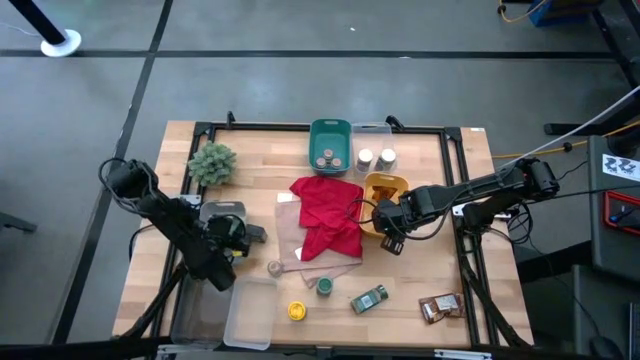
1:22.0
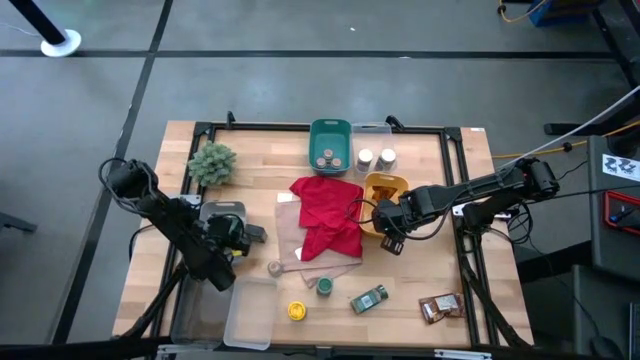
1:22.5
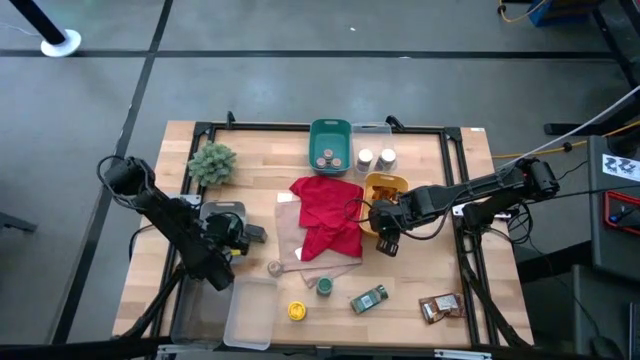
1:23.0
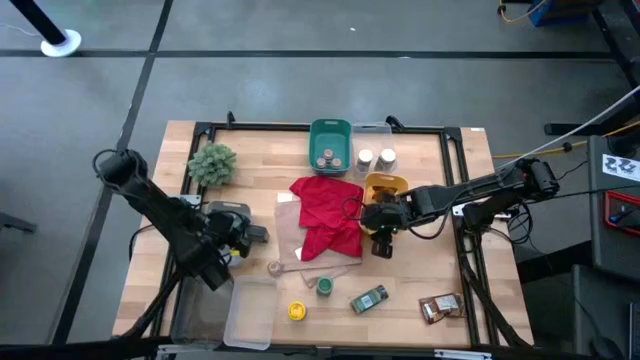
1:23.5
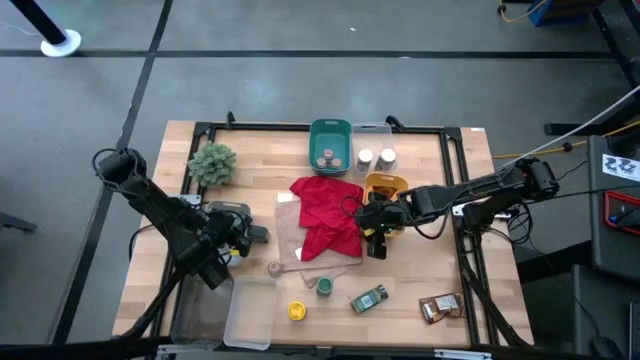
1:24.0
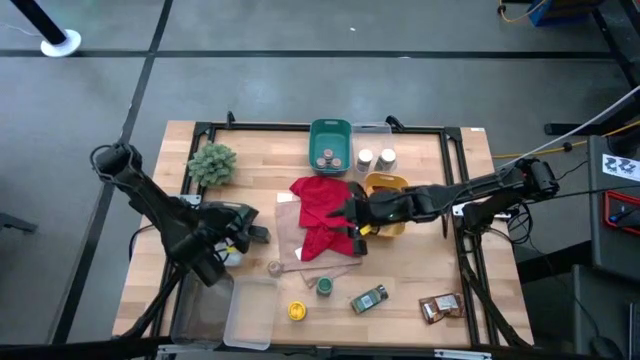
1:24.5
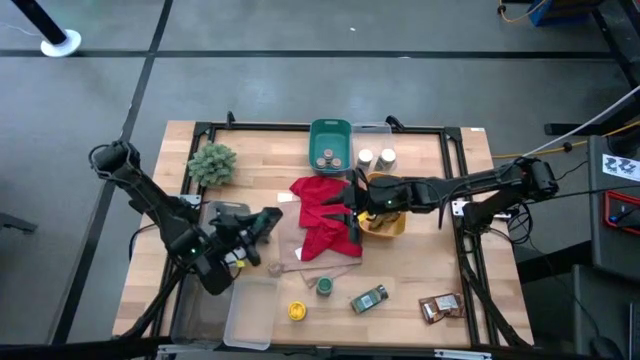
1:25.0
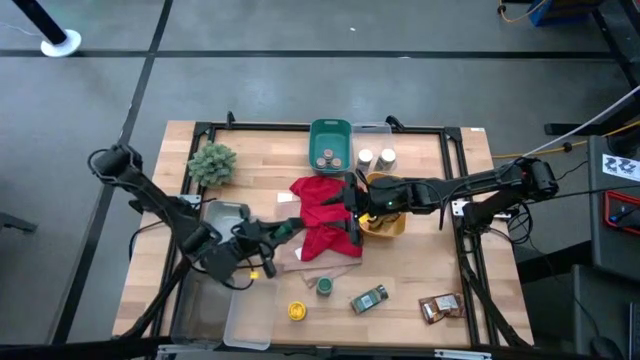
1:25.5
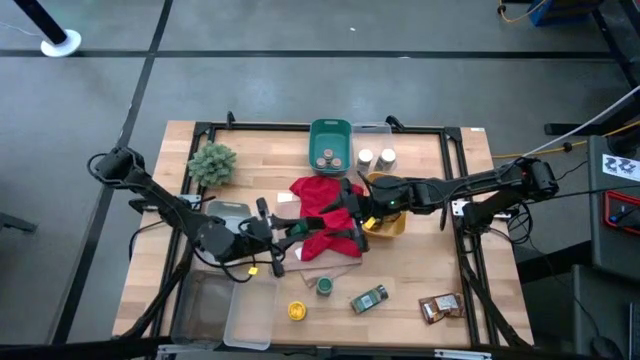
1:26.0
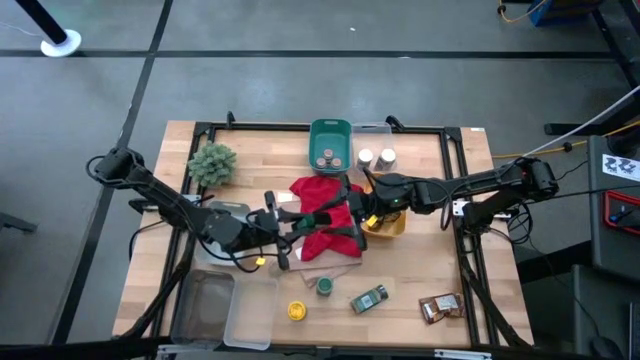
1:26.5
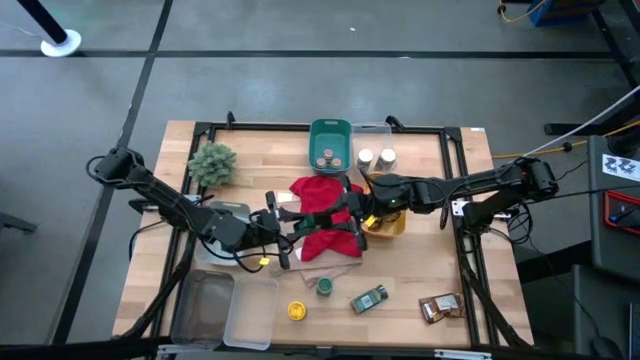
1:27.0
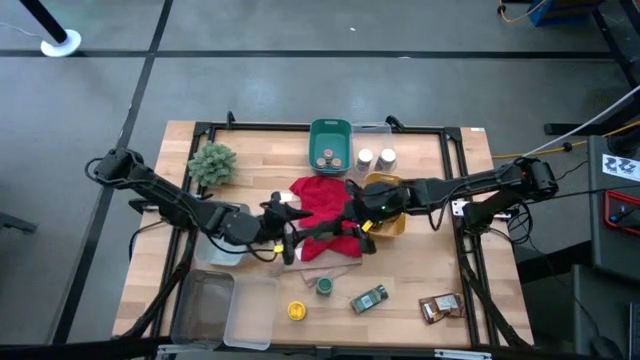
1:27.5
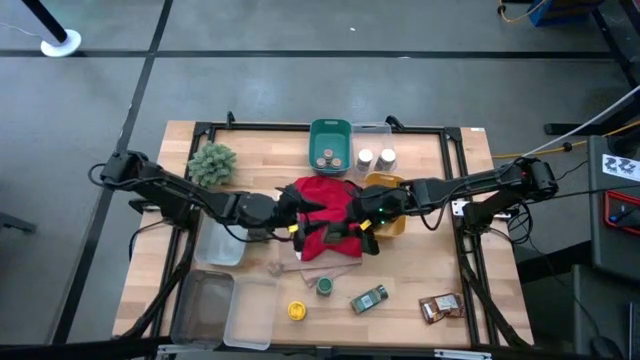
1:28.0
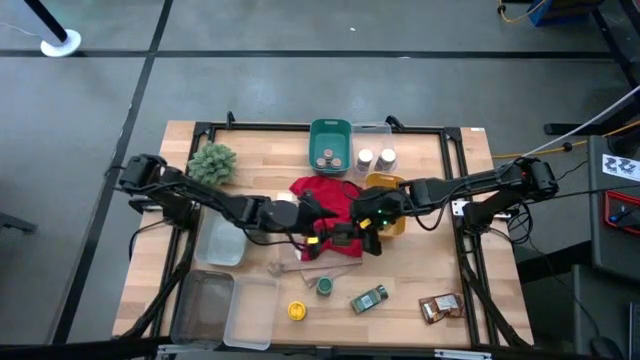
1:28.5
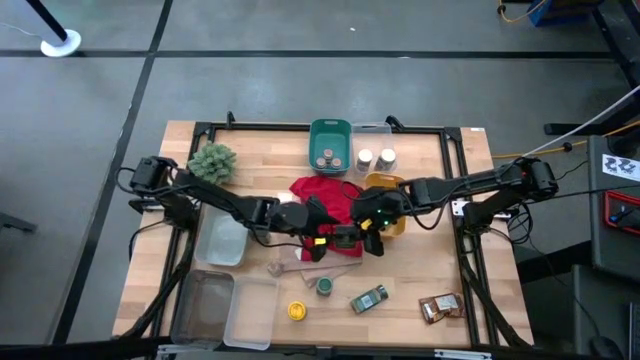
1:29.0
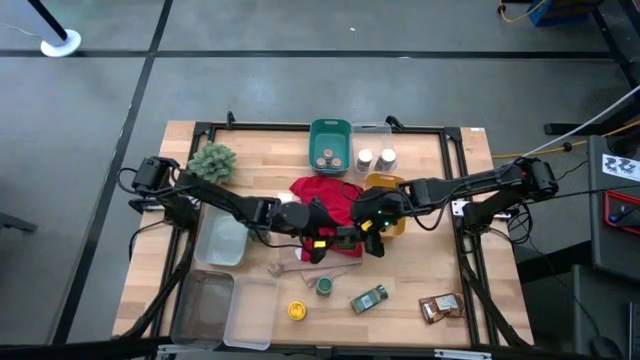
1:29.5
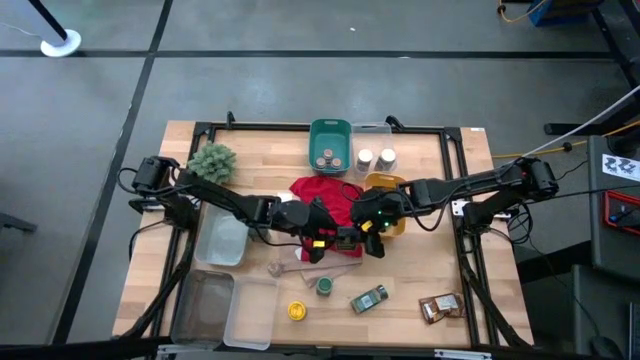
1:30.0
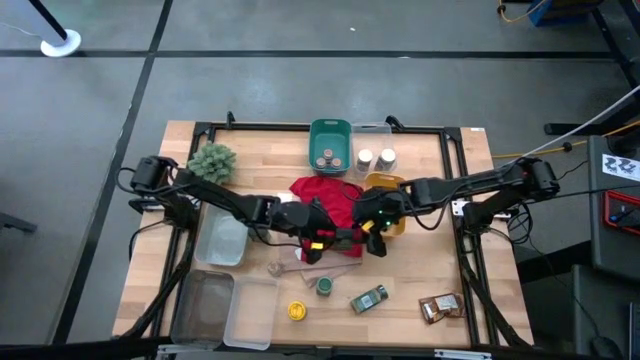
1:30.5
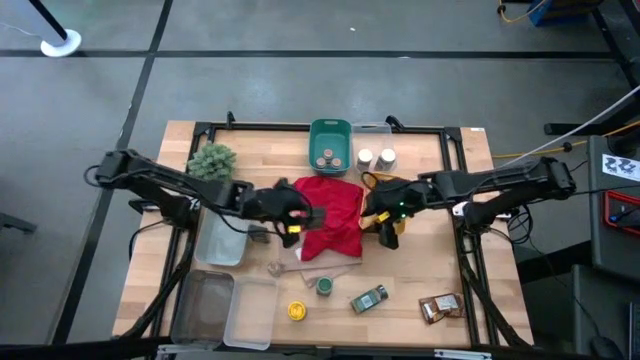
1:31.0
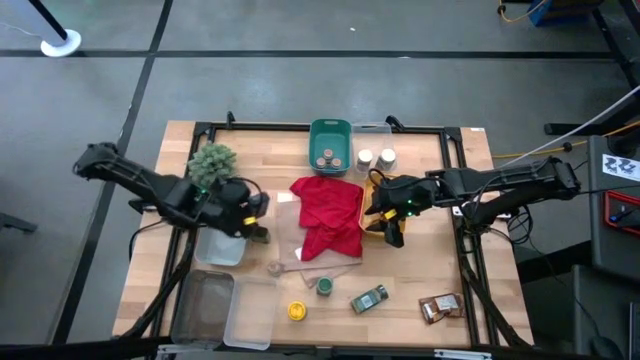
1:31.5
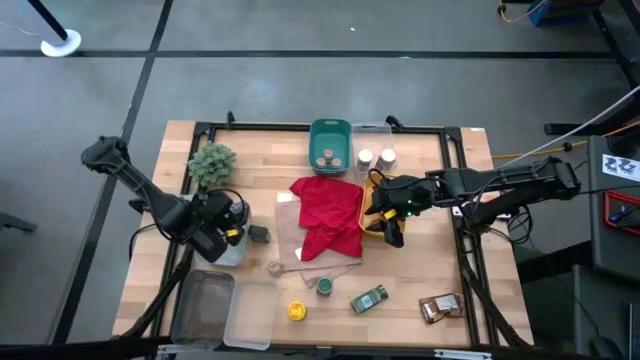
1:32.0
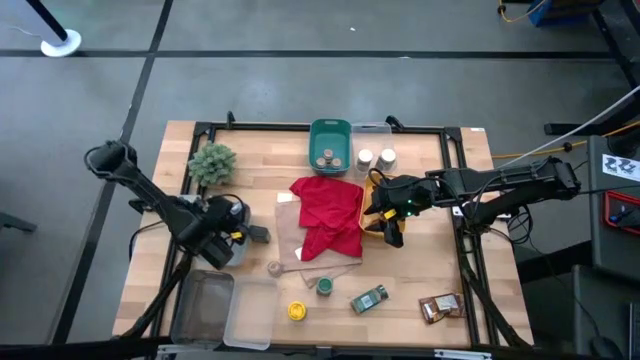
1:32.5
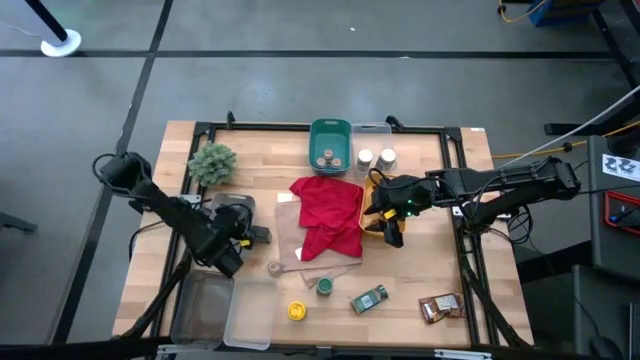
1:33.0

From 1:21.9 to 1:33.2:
Task: Sort spices by type
Put the top green seasoning can into the white bin

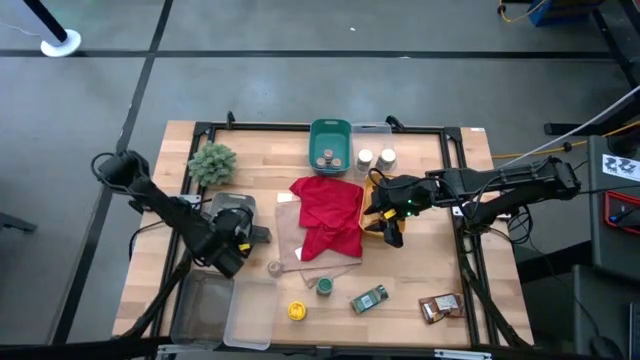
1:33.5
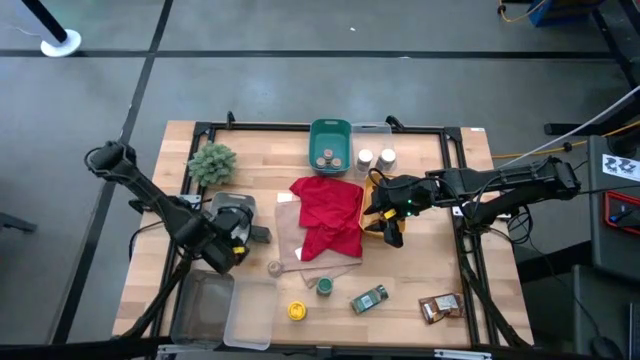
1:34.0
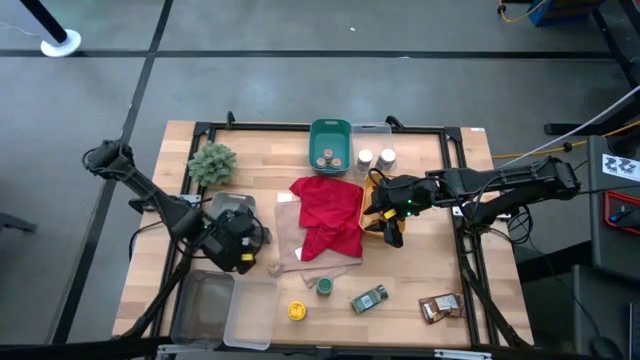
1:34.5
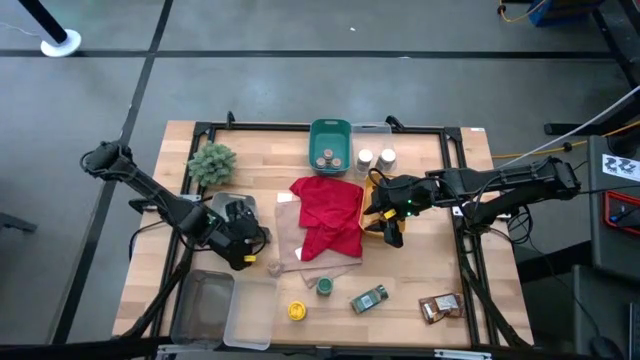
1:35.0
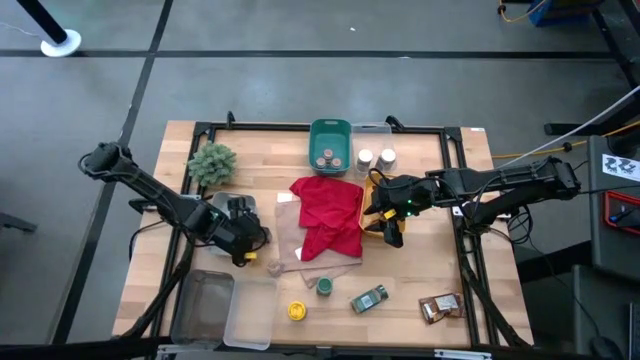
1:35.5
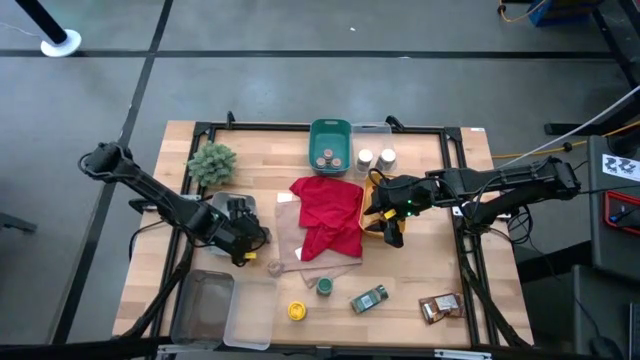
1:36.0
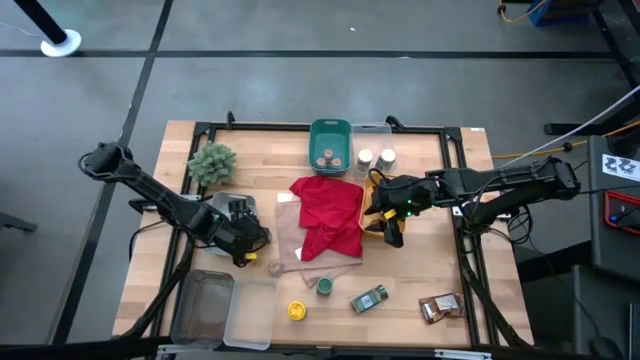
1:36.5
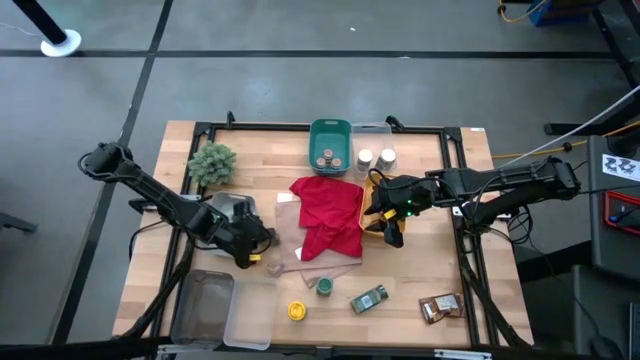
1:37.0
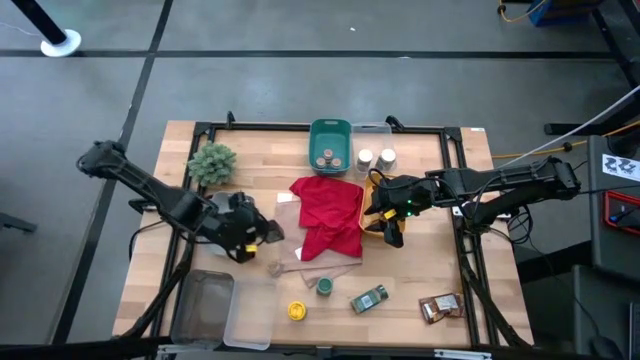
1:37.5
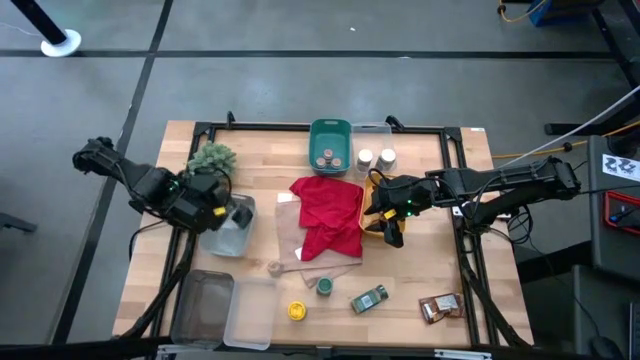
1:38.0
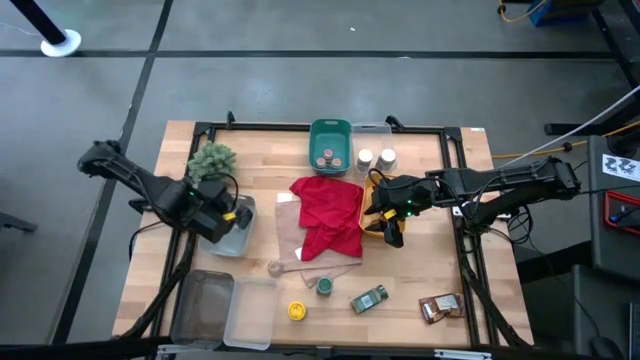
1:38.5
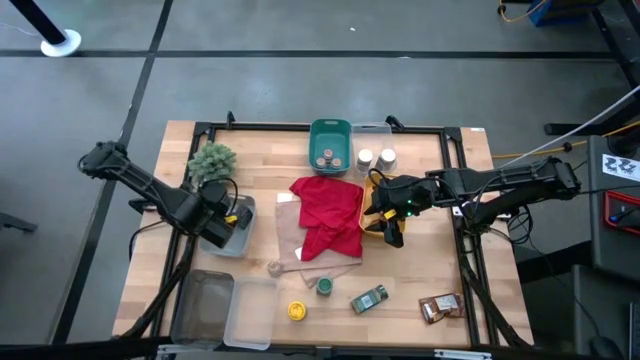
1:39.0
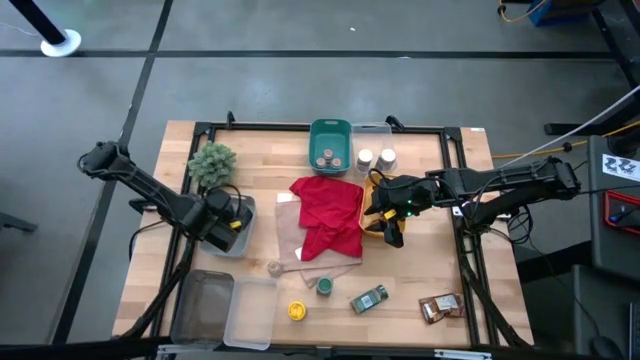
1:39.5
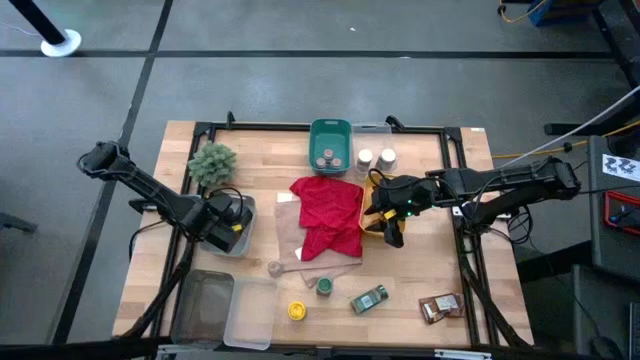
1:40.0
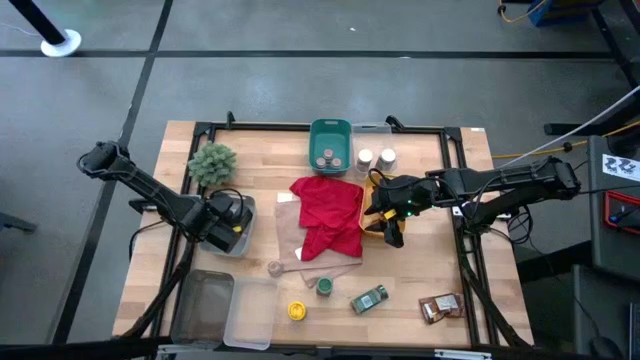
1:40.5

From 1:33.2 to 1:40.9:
Put the green seasoning can into the white bin

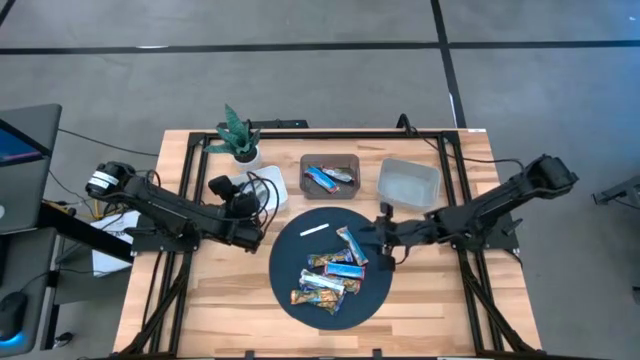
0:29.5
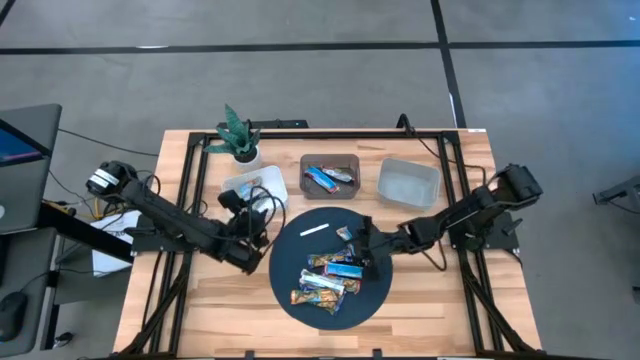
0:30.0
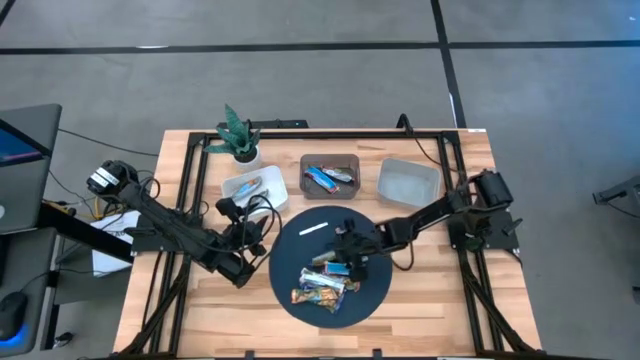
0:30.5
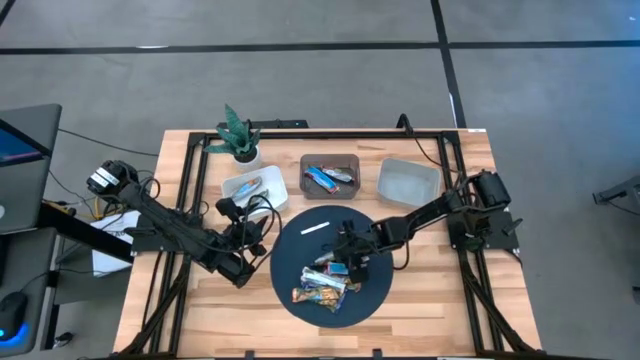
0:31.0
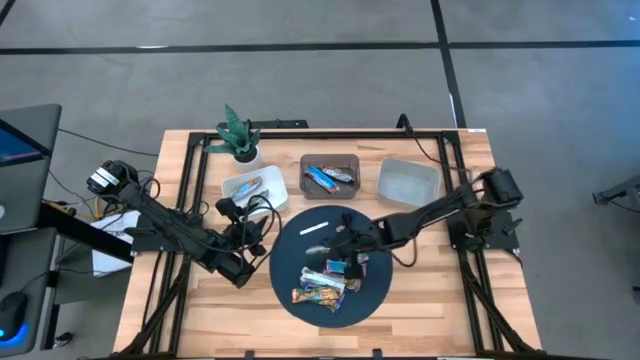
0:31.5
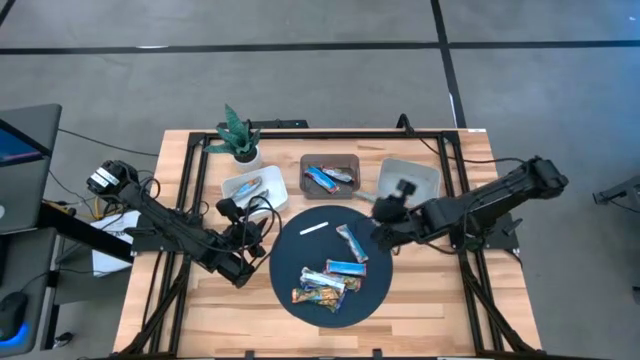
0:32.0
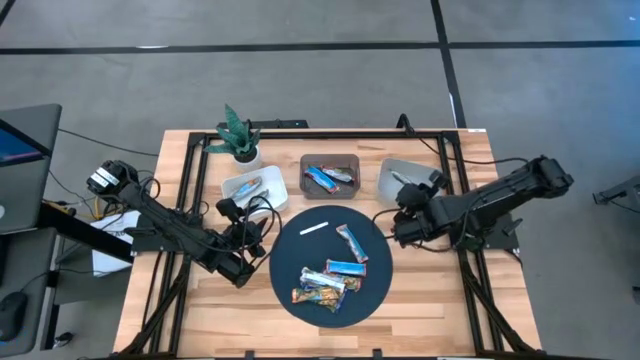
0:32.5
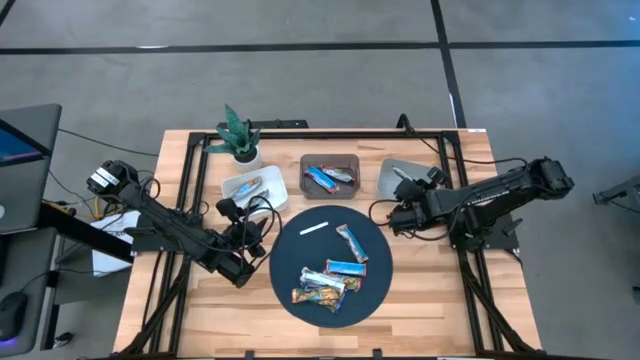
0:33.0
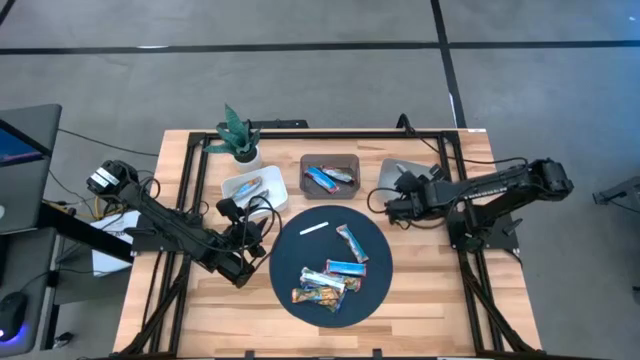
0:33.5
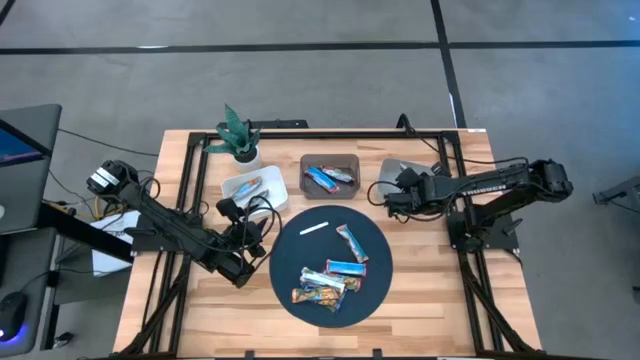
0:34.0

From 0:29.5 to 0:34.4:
Task: Pick and place Granola Bars by type
Put the top purple granola bar into the gray bin
